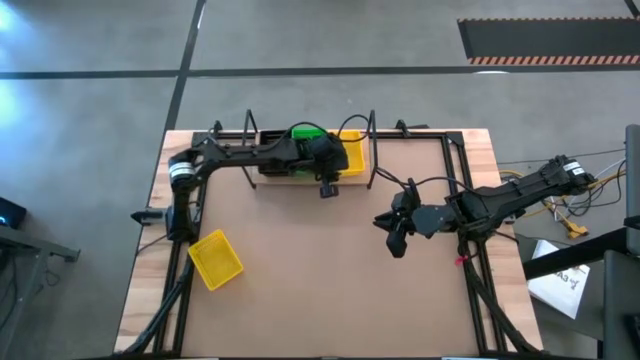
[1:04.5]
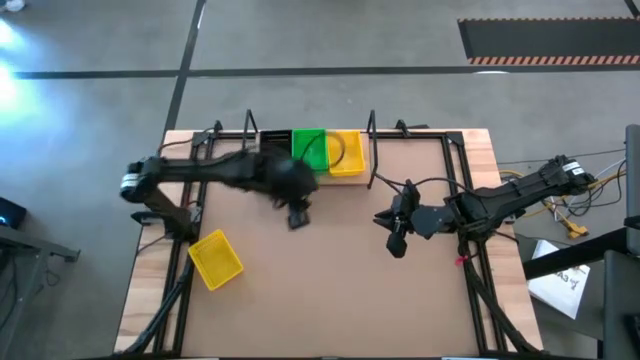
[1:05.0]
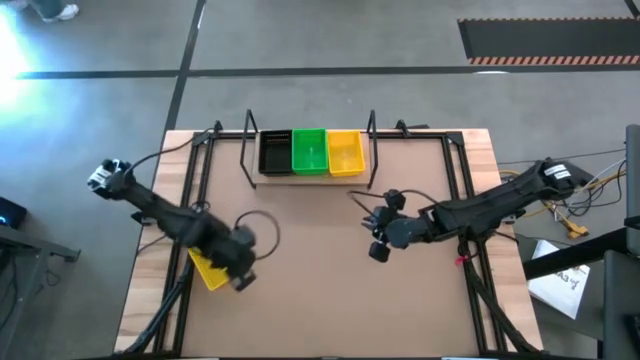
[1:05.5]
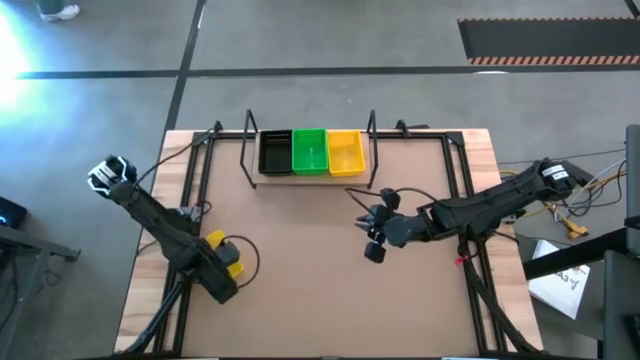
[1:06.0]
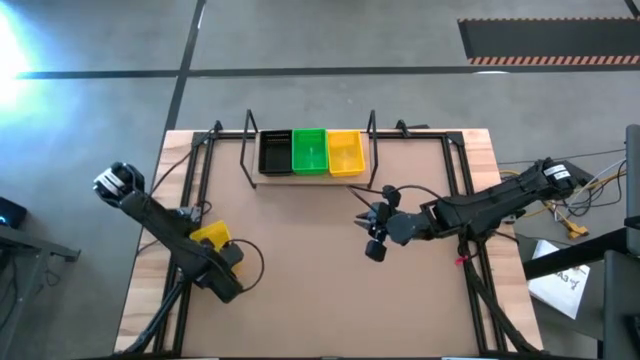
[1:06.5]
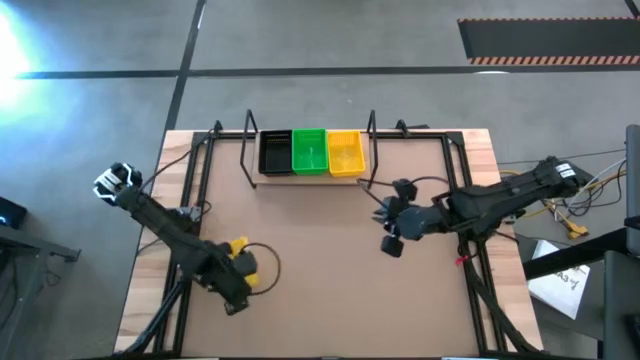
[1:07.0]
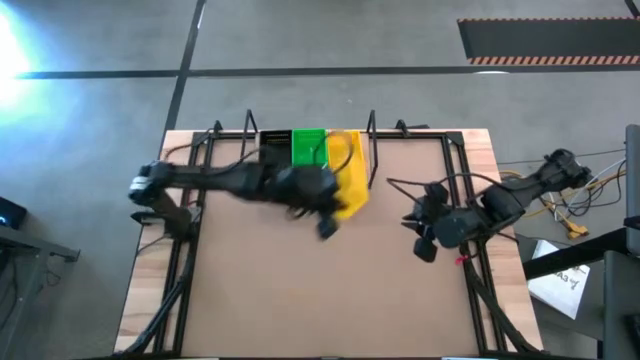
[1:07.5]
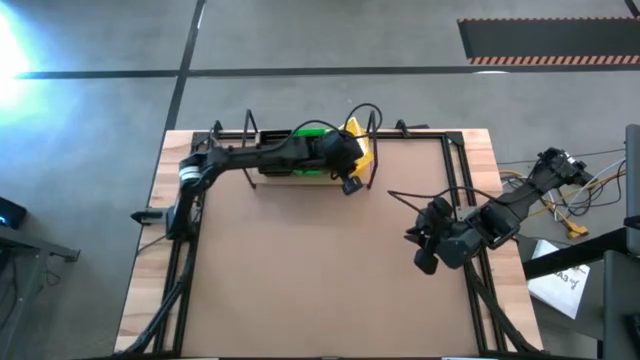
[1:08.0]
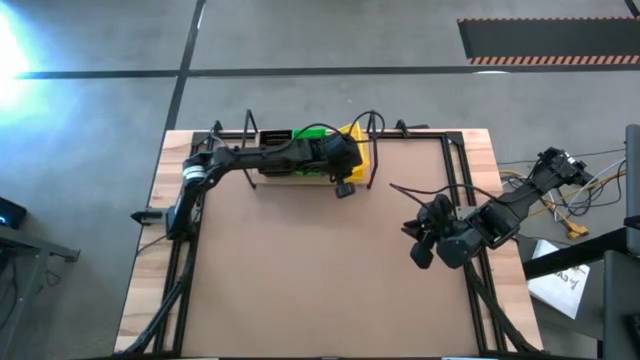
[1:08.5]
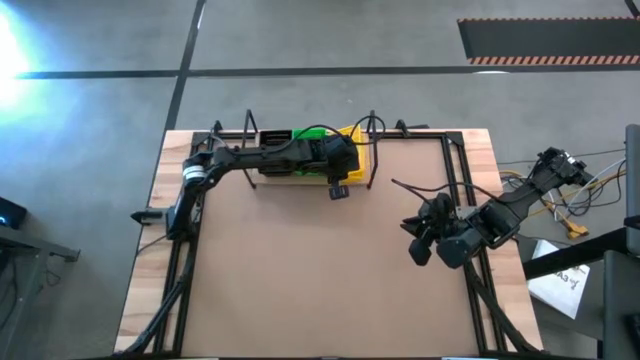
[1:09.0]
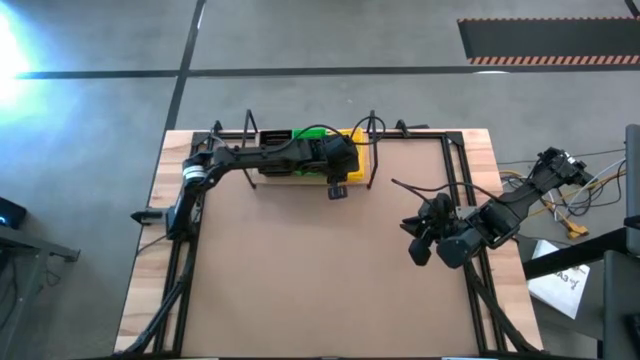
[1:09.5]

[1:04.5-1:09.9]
Task: Stack baskets on shelf by color
Stack the yellow basket on the yellow basket on the shelf

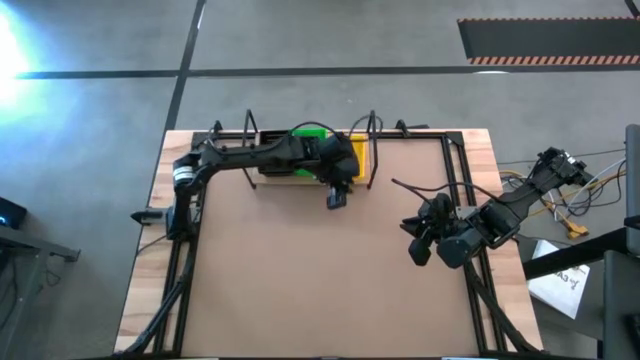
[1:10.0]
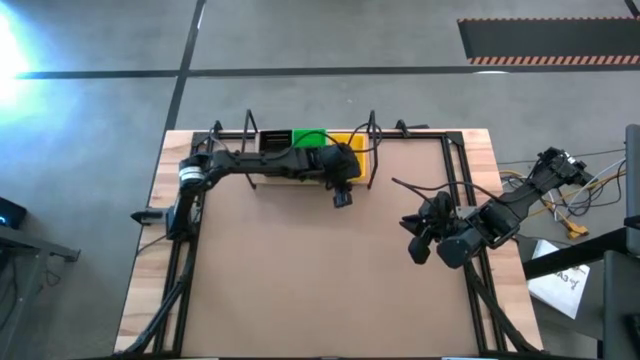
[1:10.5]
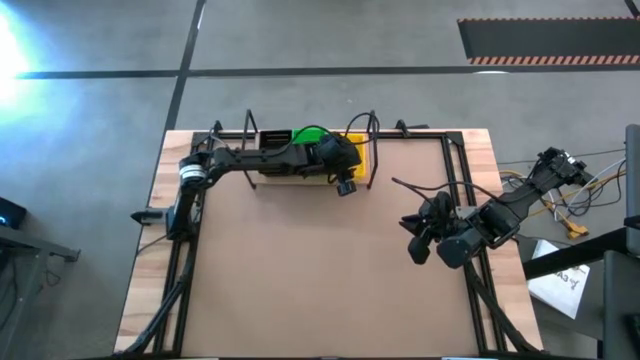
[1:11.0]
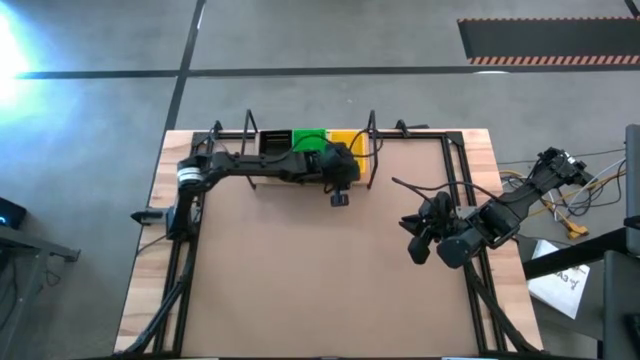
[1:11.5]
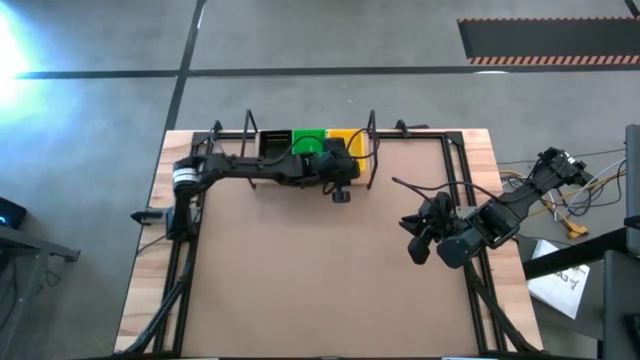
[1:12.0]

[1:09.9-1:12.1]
Adjust the yellow baskets on the shelf

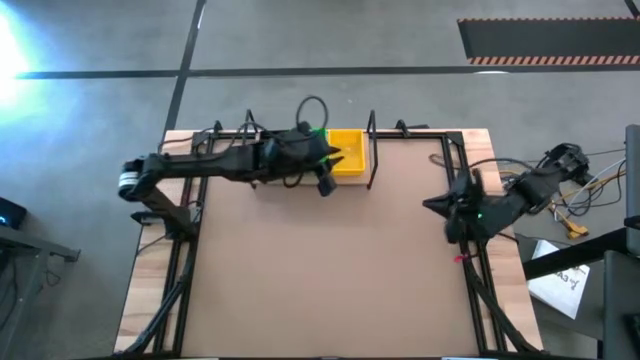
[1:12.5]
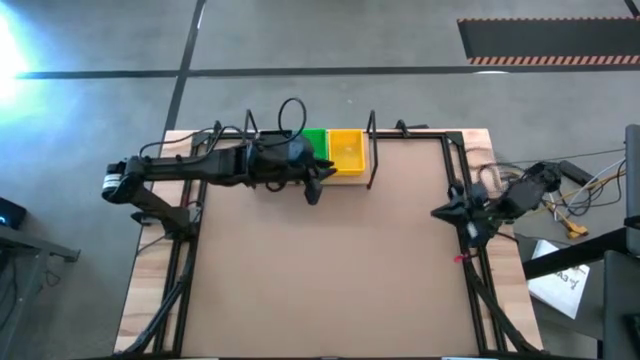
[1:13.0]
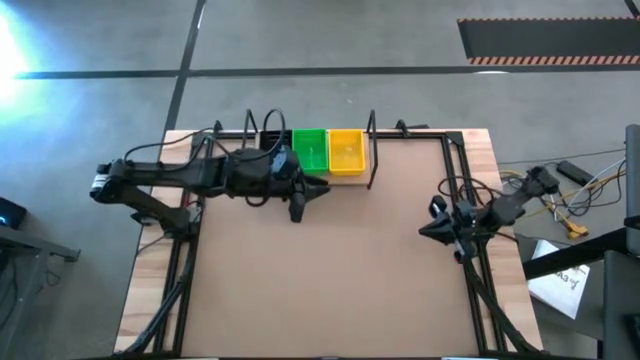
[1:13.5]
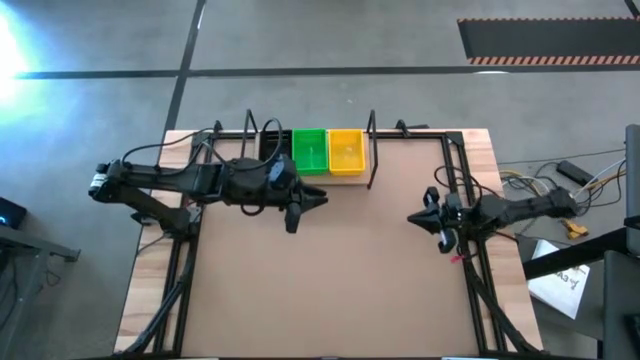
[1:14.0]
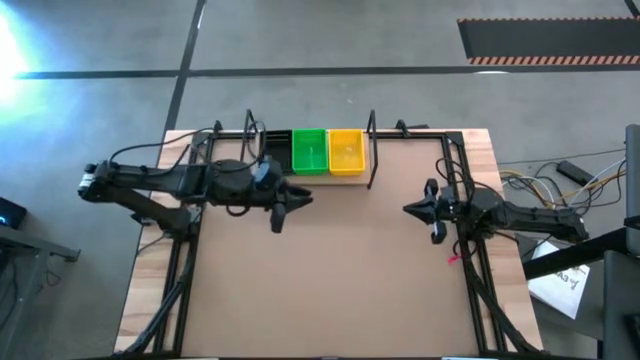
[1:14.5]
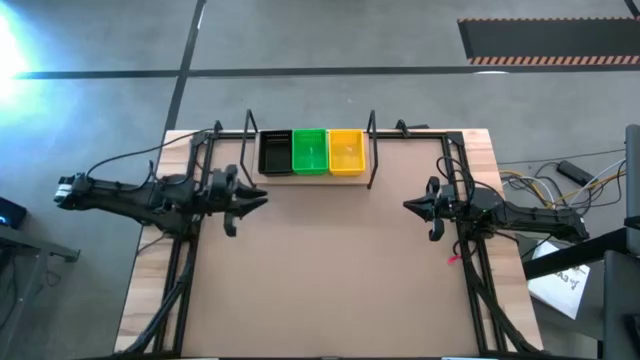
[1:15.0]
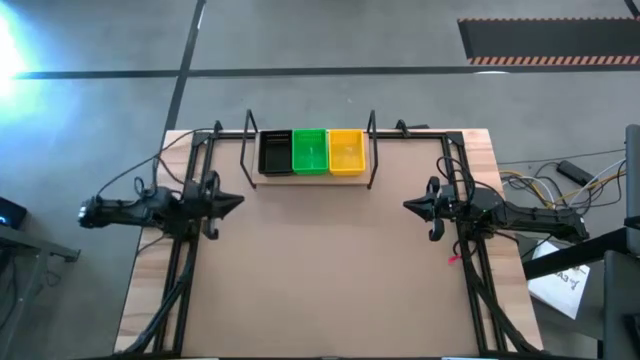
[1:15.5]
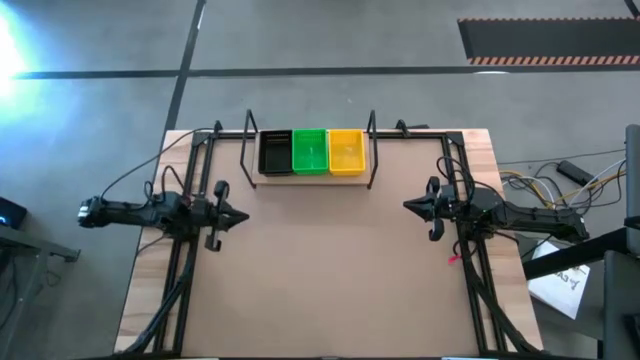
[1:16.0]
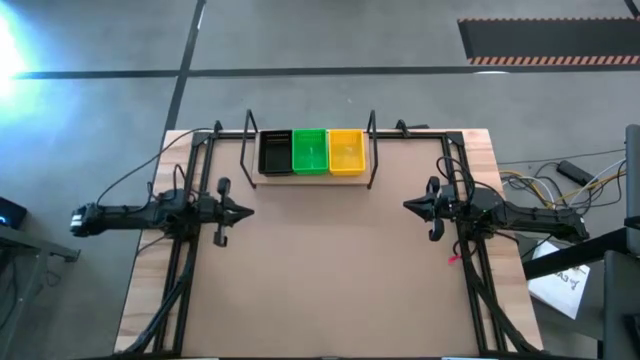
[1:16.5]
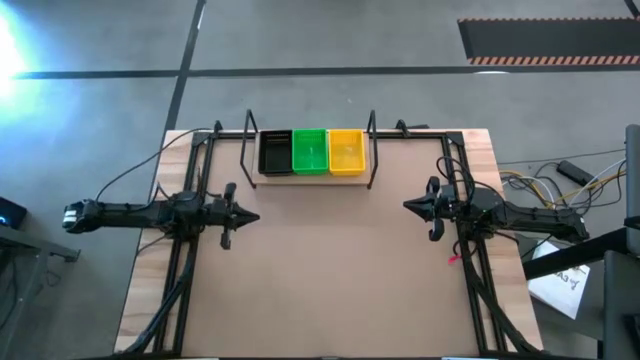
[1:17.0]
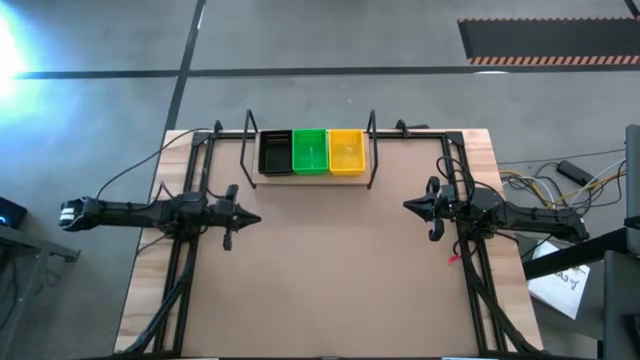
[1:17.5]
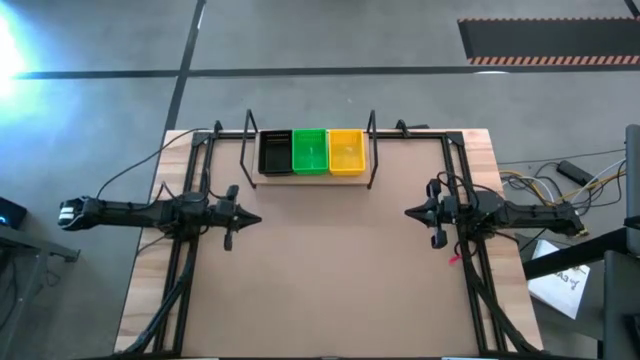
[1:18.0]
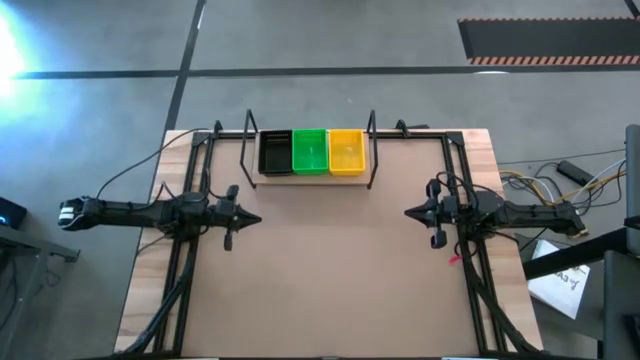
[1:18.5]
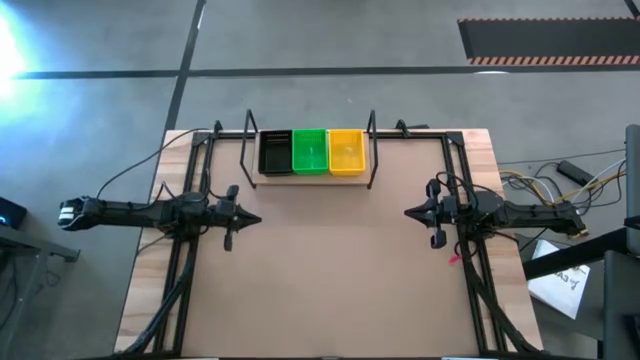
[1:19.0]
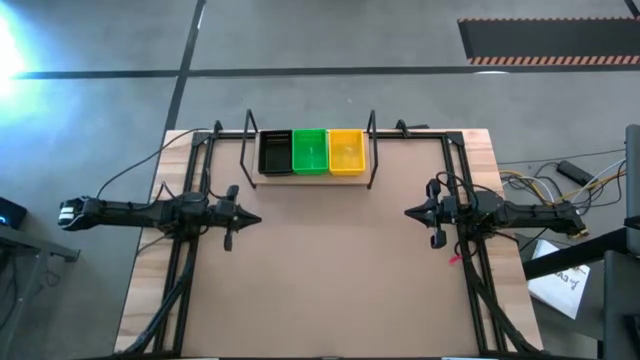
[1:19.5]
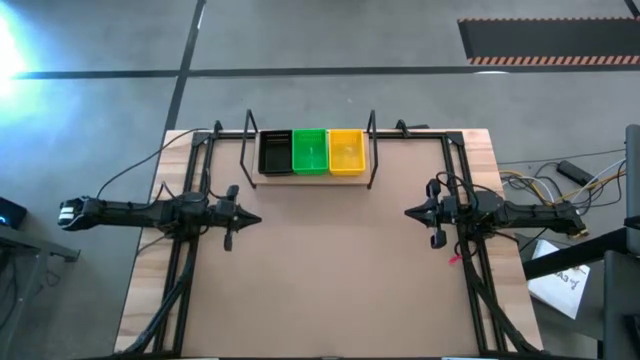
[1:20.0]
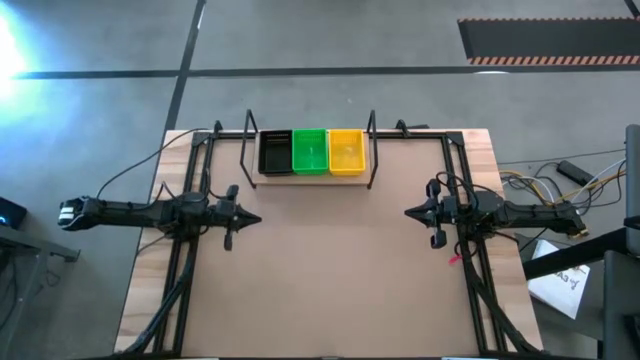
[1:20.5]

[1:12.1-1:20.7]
Return to Home Position

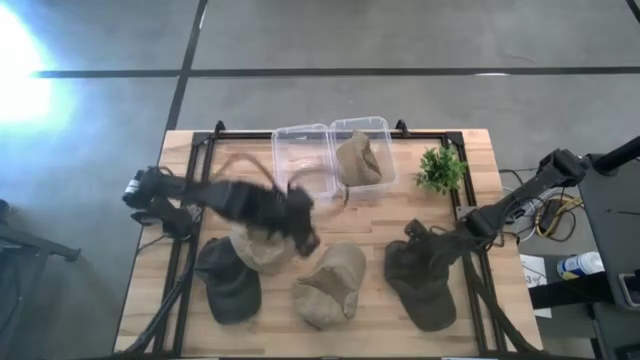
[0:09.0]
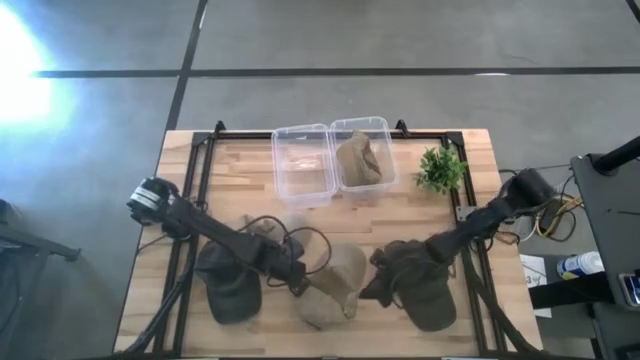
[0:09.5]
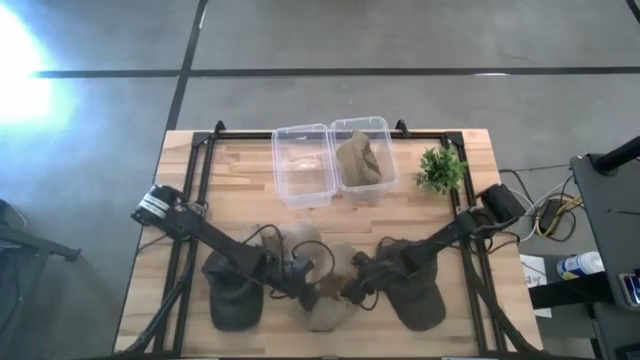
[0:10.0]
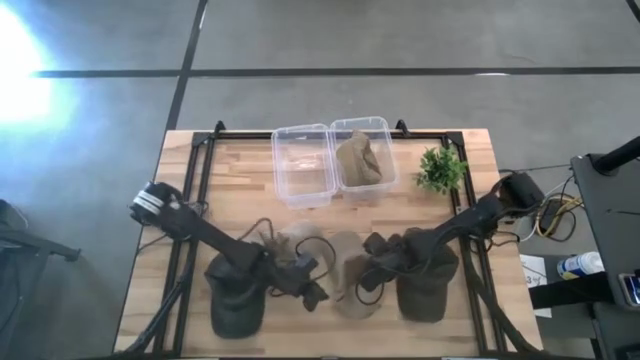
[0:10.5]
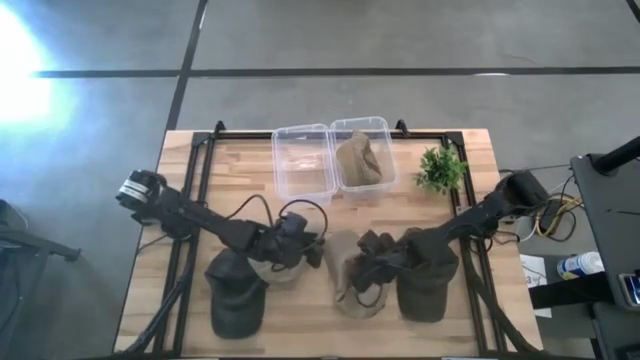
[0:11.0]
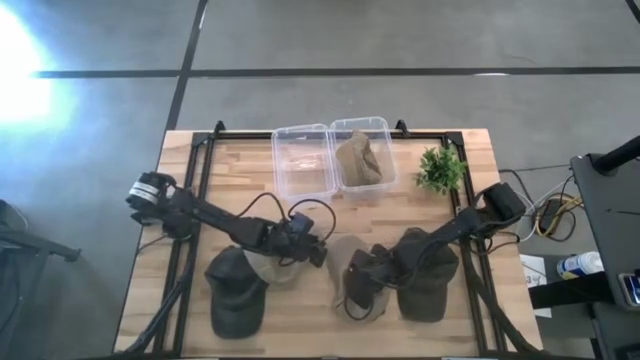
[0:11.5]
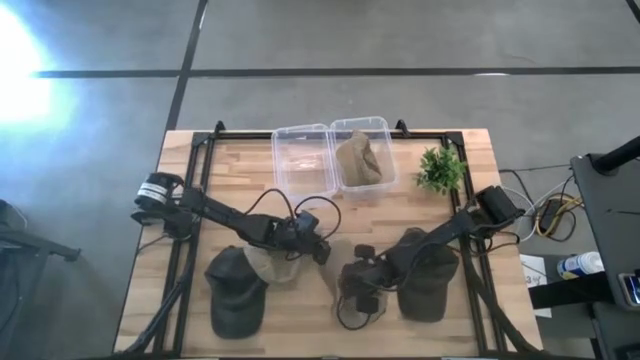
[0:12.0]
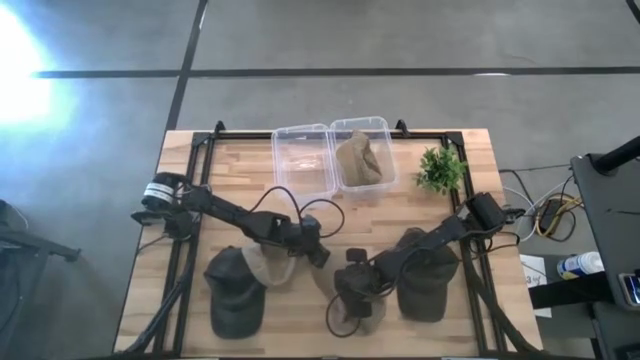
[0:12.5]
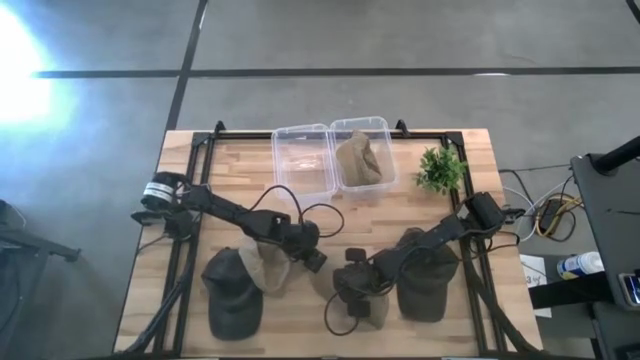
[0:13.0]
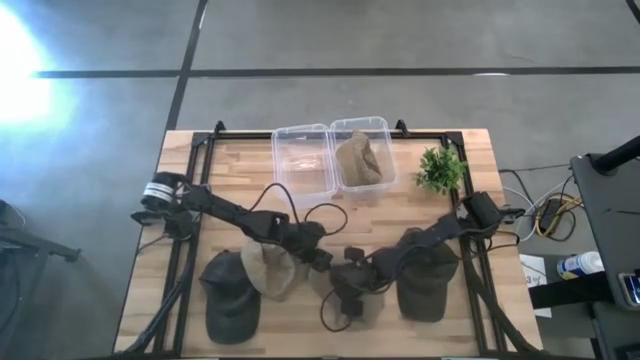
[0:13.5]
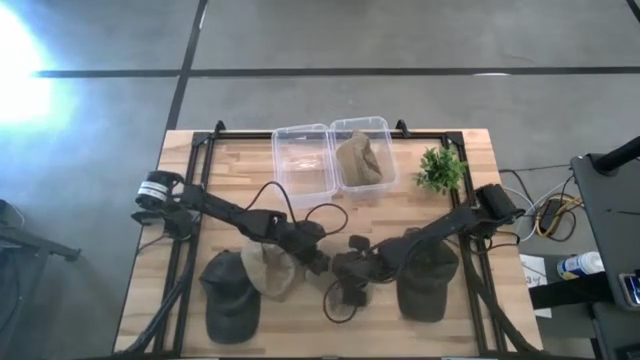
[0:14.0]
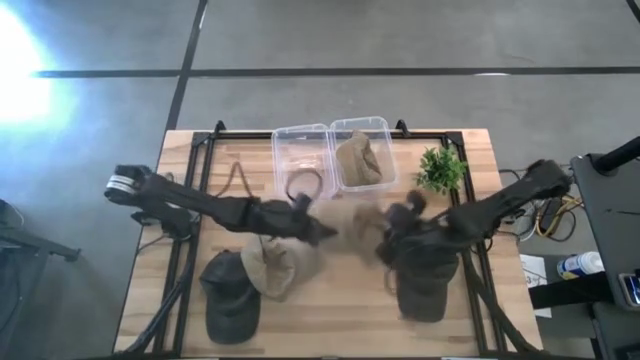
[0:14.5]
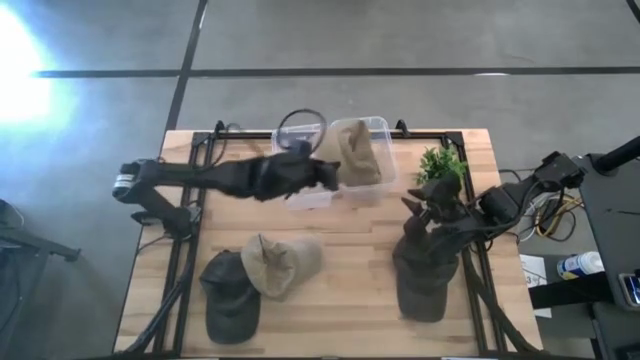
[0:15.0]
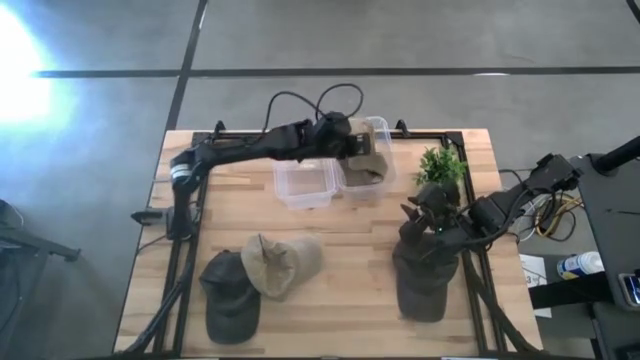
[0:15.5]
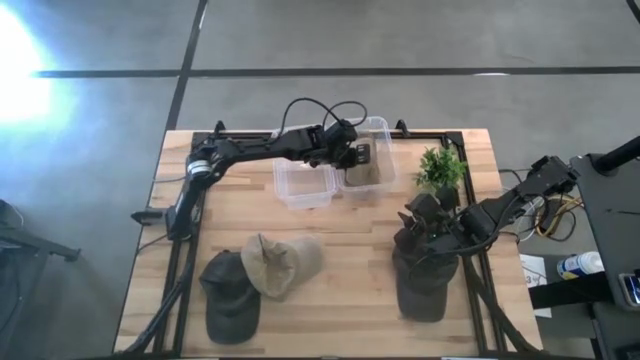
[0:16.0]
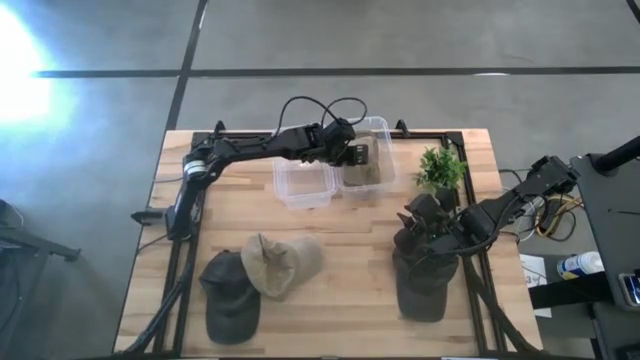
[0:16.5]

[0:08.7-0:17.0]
Task: Pick and place caps into container
Put the right brown cap into the right transparent container
